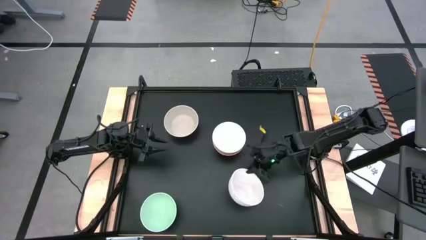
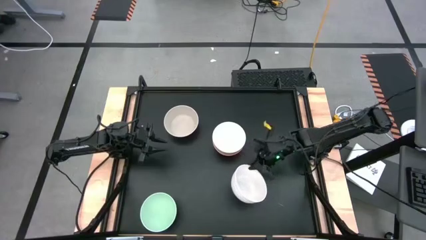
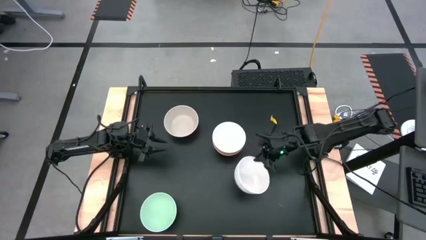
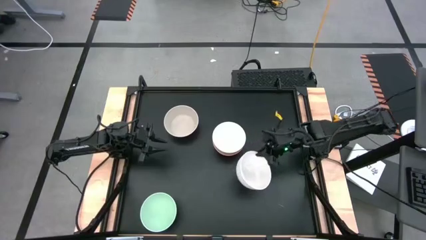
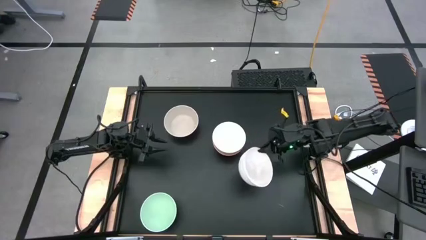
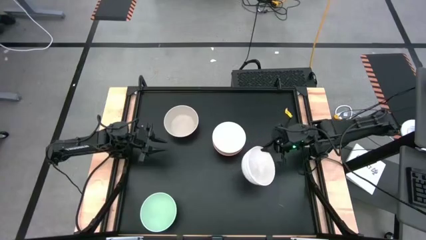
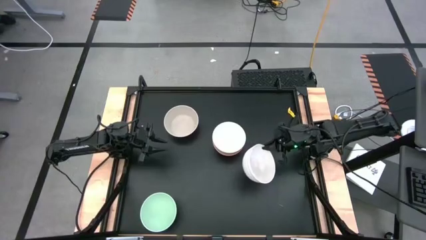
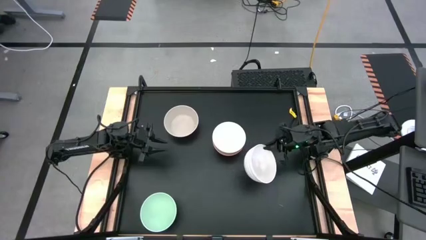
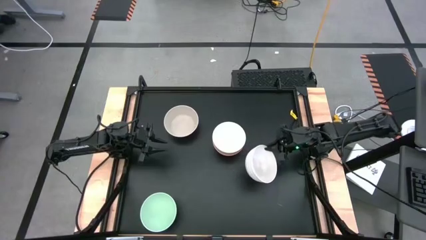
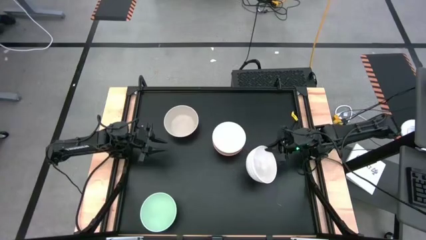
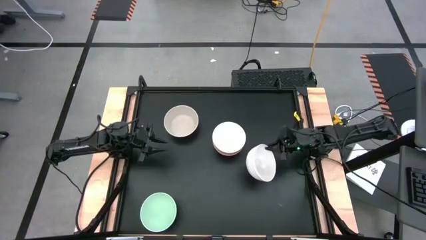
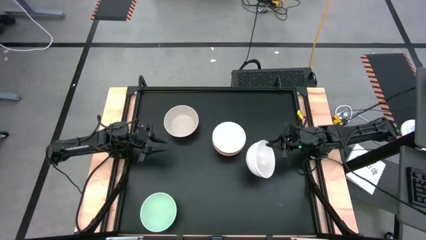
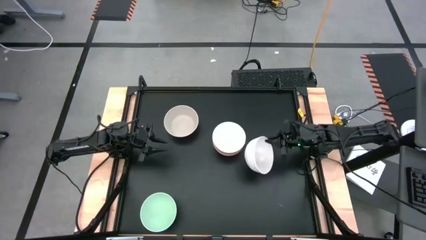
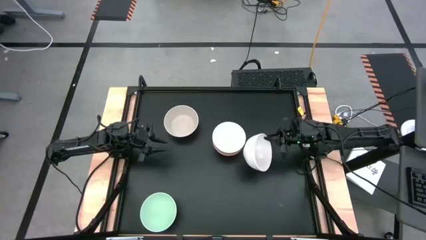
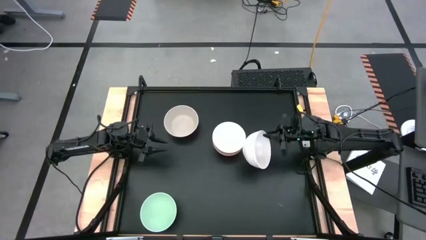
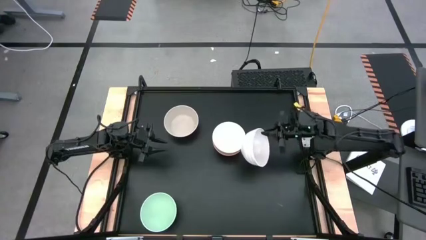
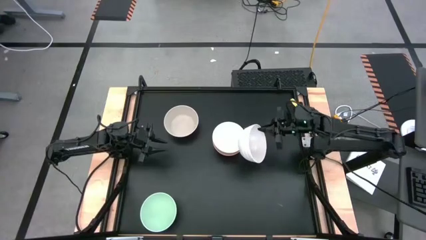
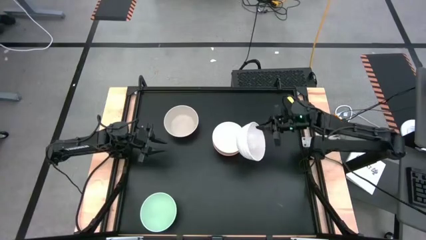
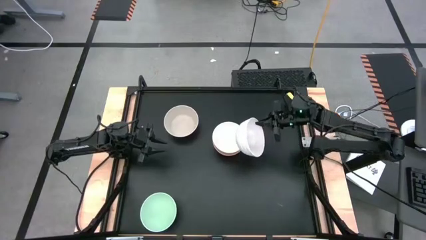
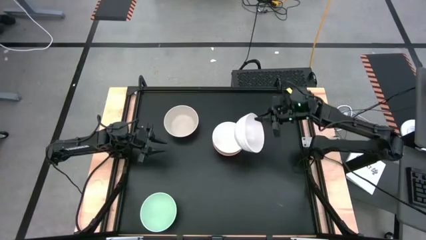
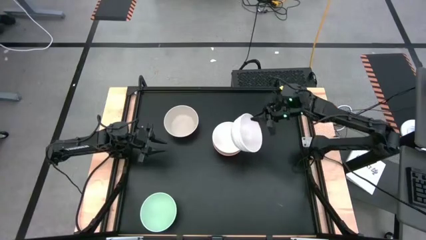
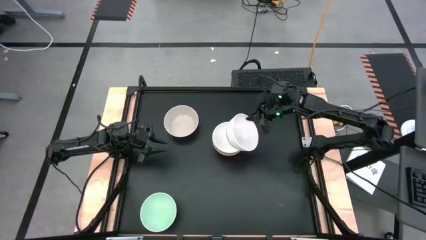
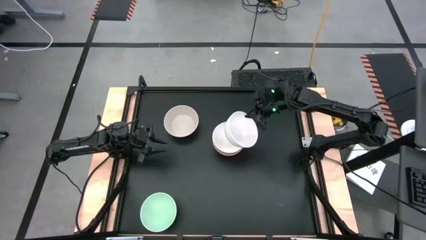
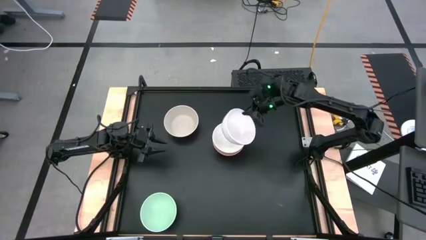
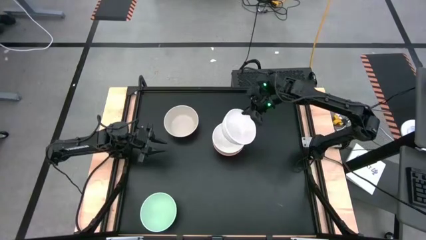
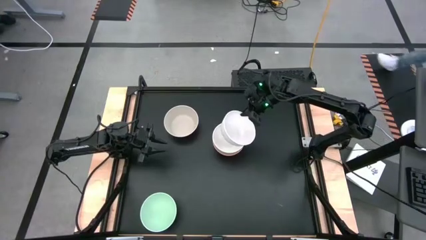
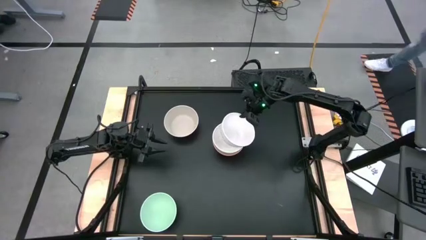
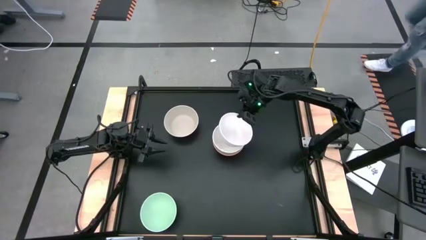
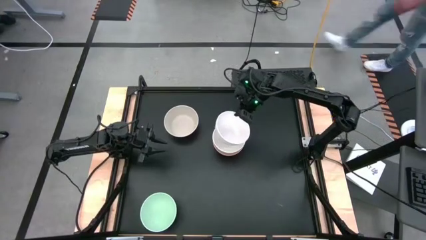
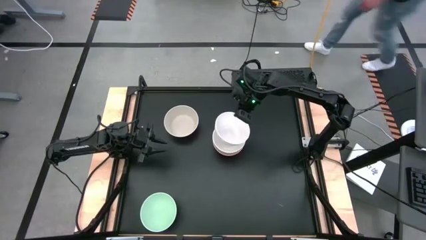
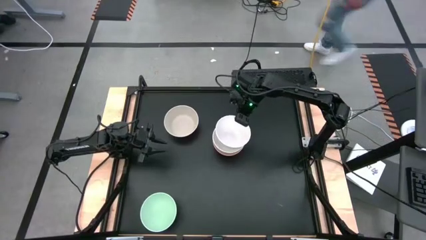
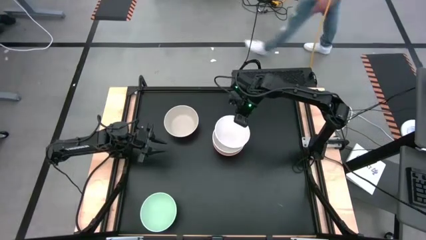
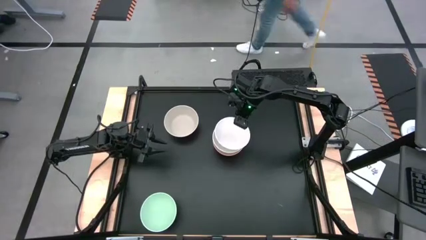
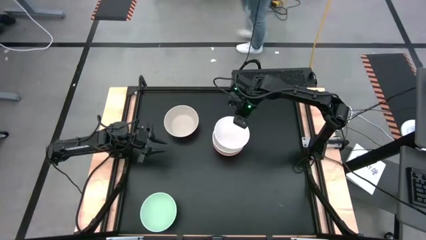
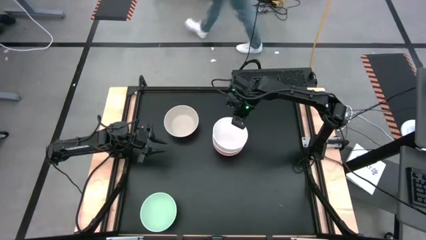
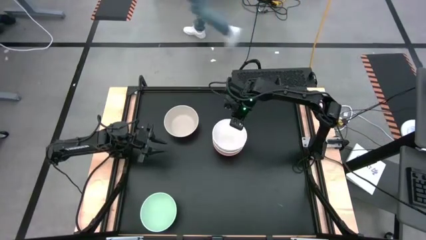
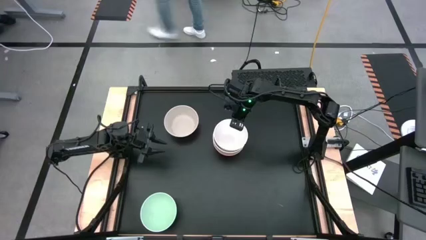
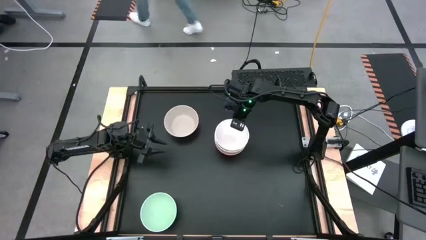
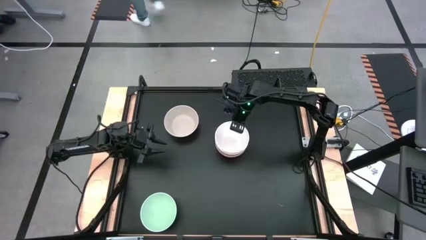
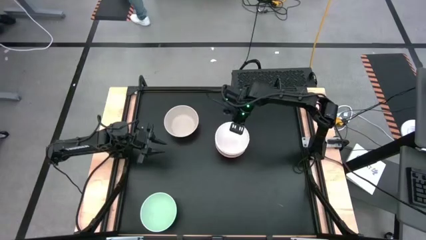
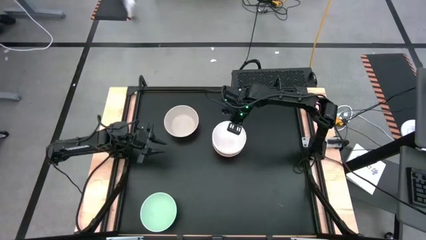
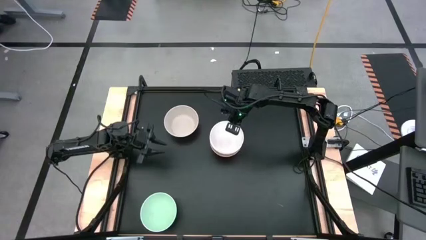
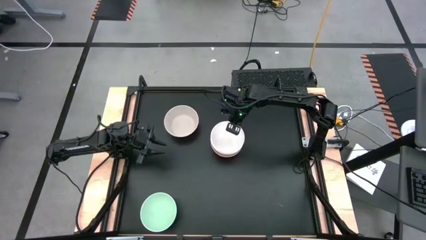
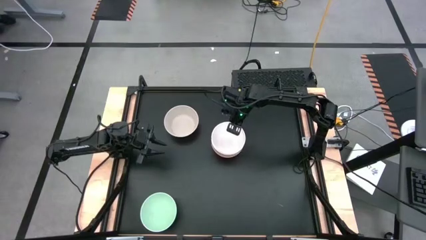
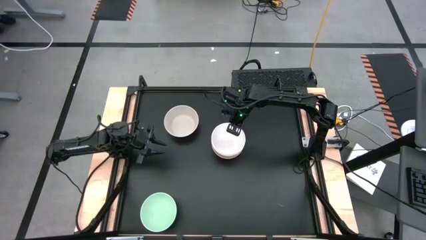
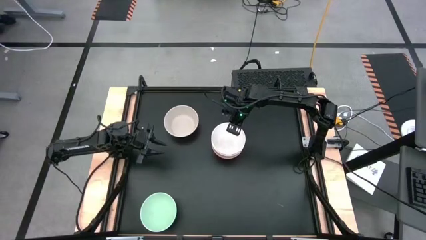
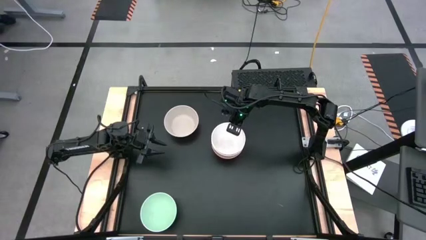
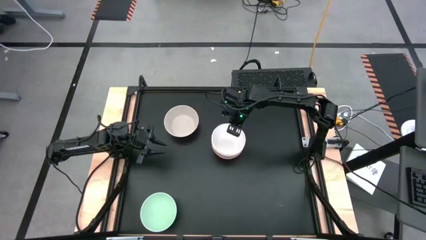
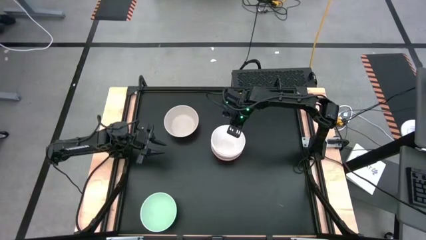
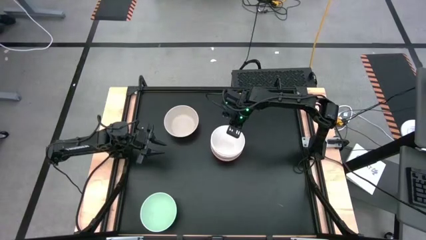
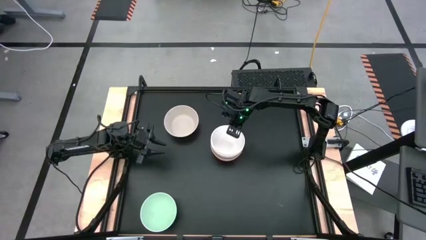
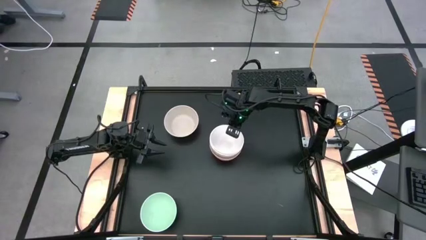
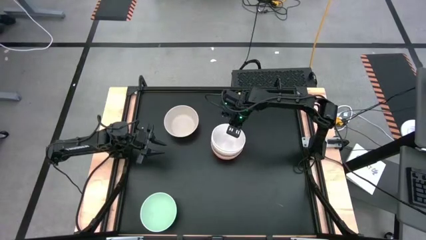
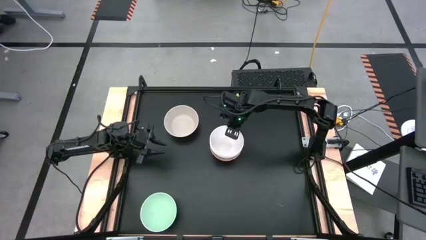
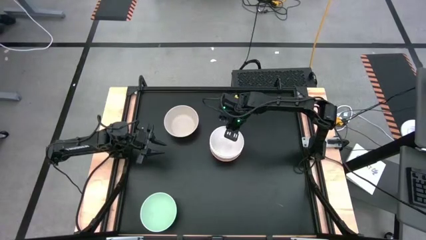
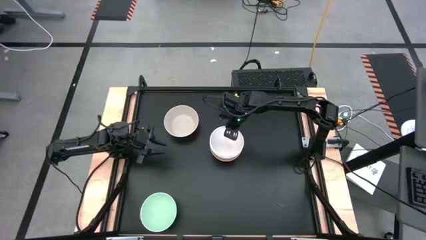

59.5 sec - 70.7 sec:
Task: Nest bowls inside each other
Stack the bottom white bowl on top of the white bowl

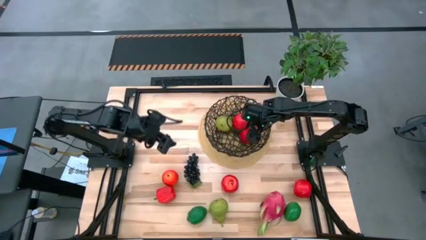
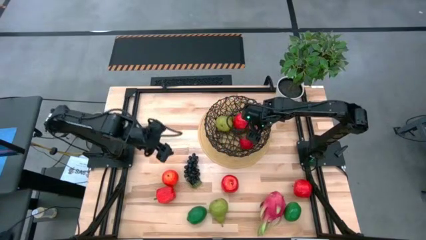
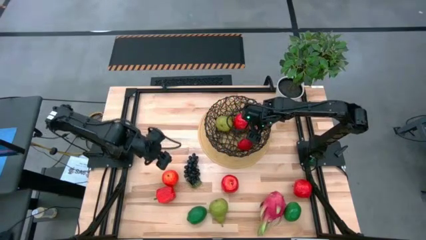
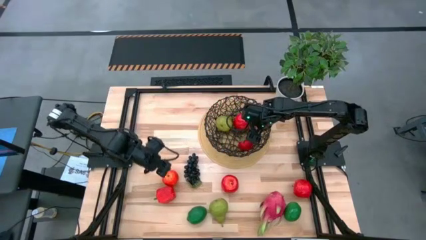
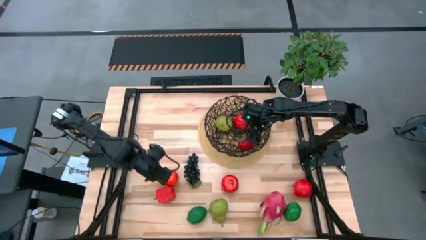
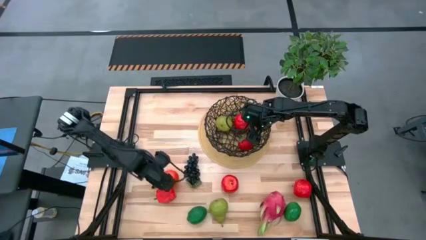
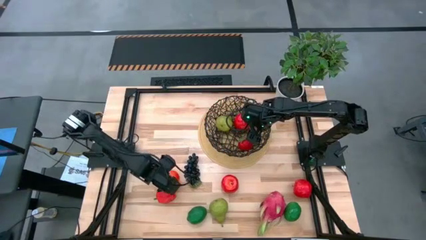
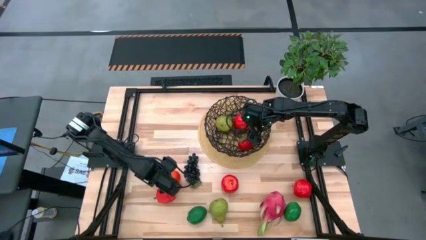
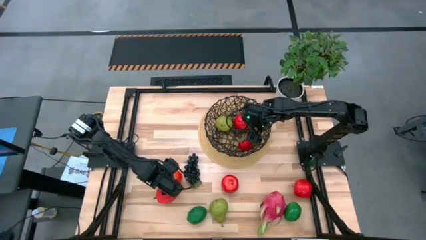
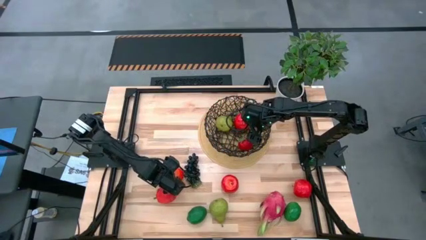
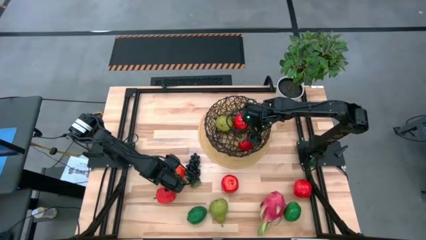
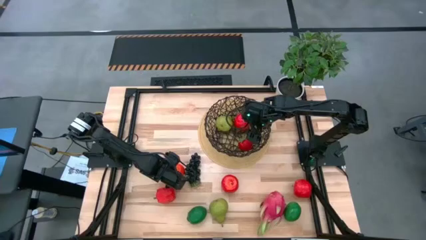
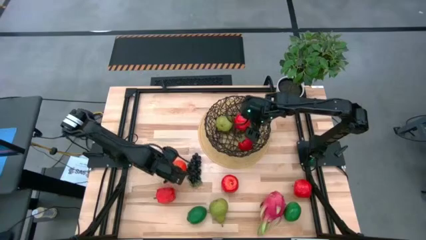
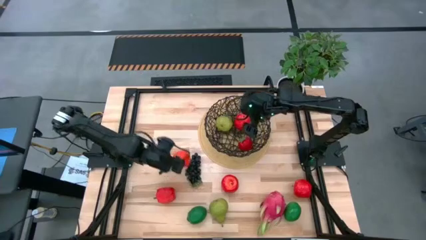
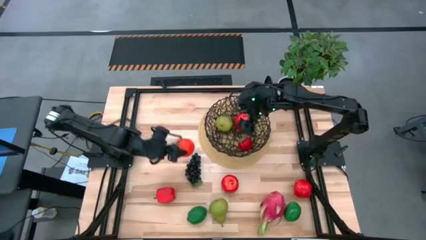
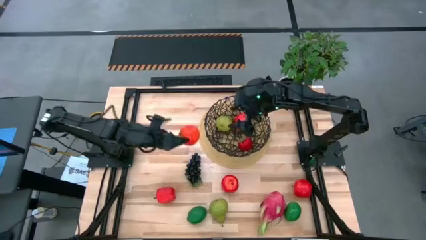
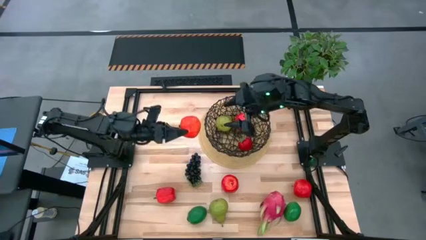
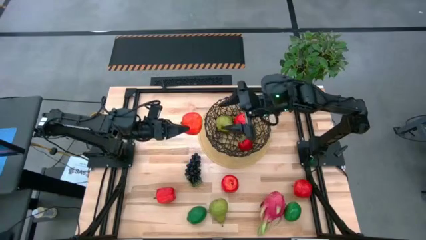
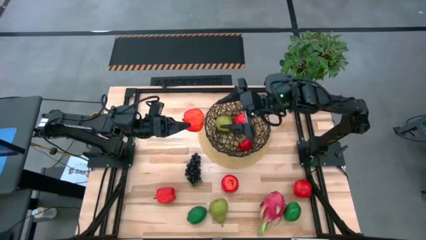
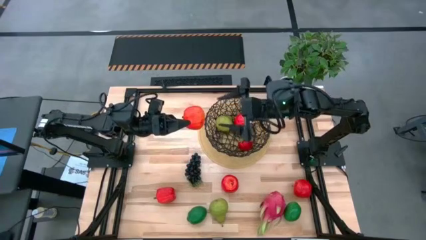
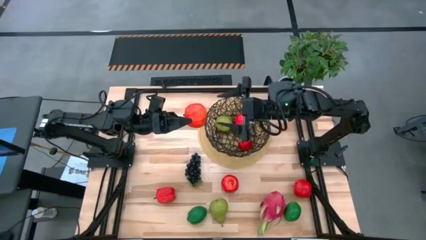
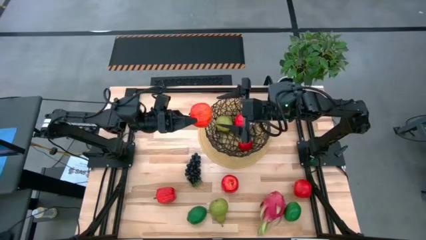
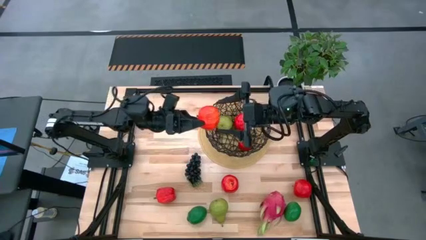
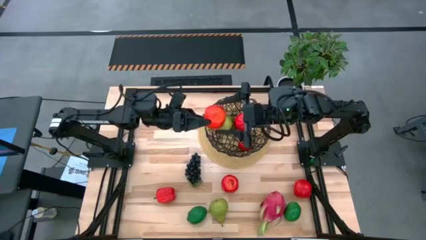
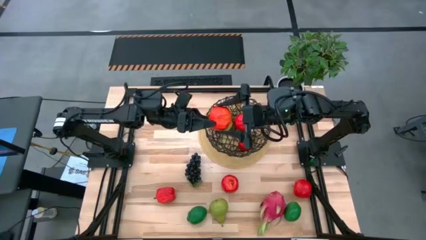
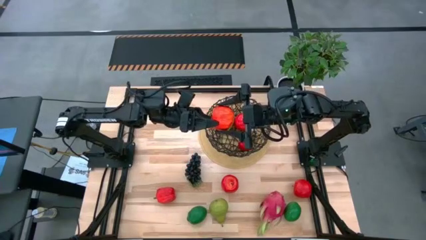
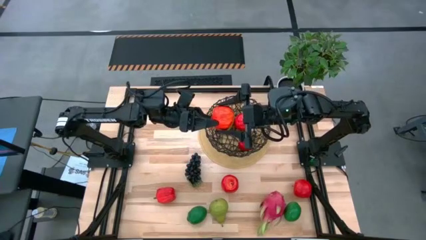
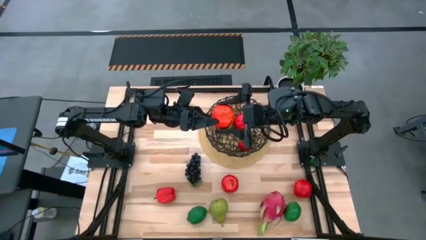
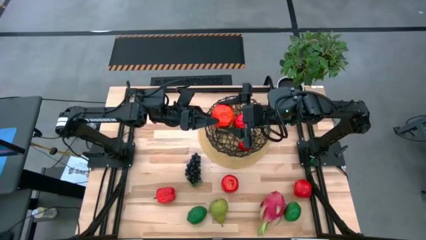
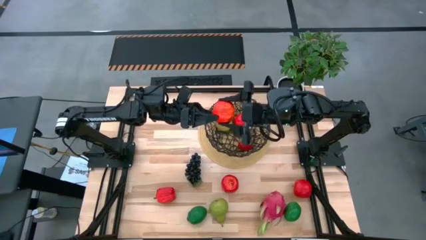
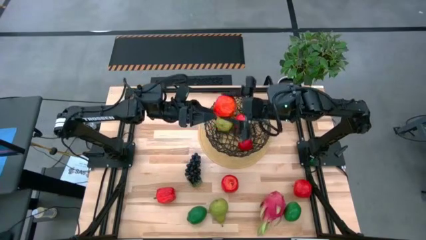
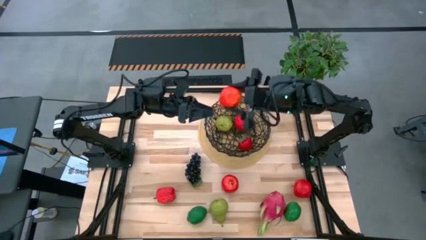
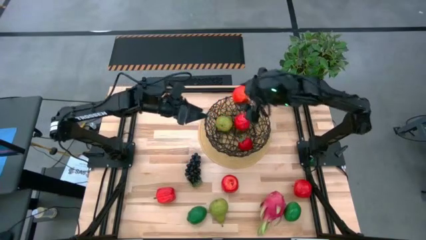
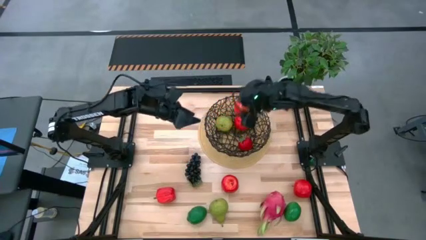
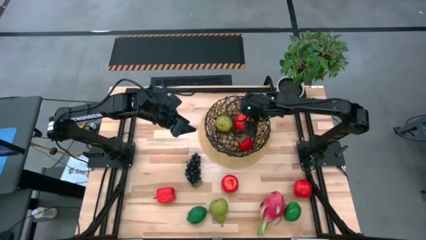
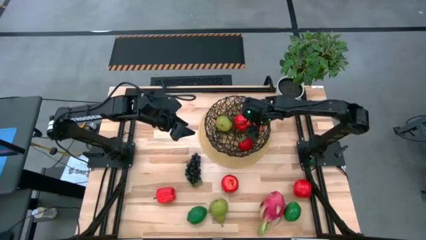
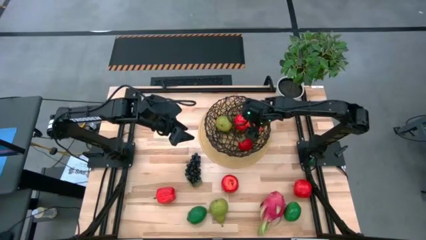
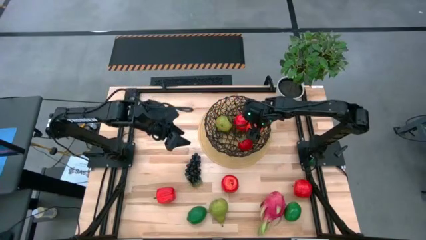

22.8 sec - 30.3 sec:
Task: Build produce basket
Put the left red apple into the black basket
